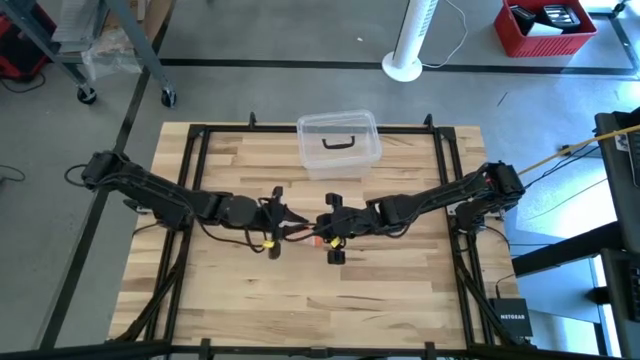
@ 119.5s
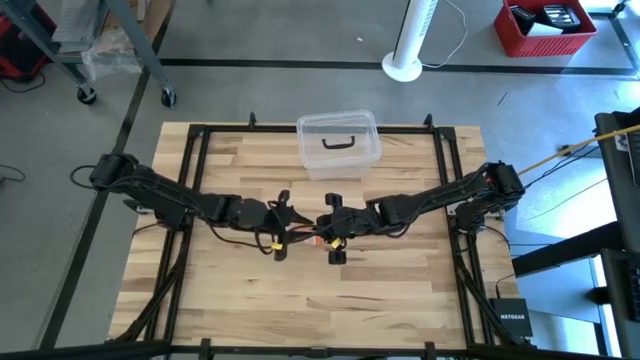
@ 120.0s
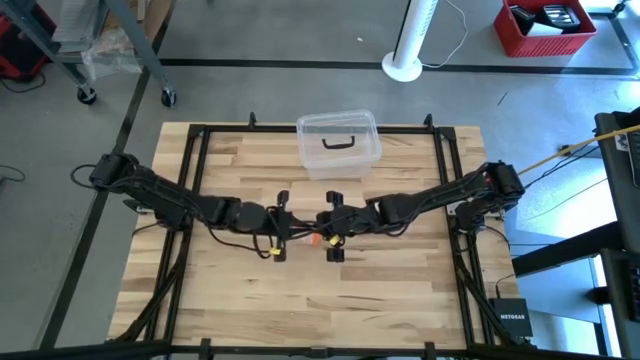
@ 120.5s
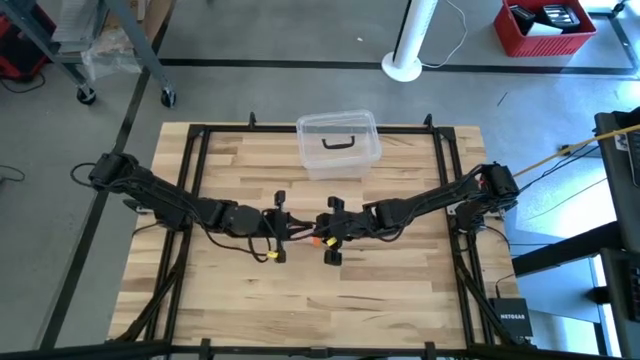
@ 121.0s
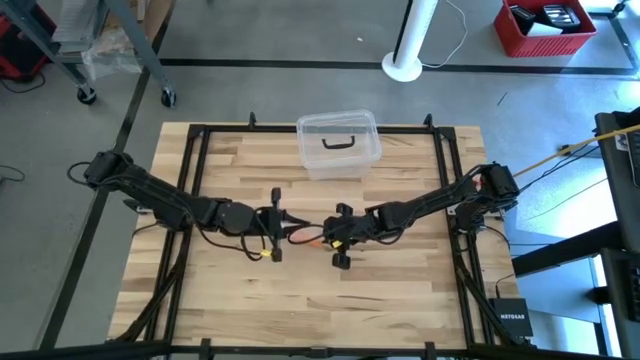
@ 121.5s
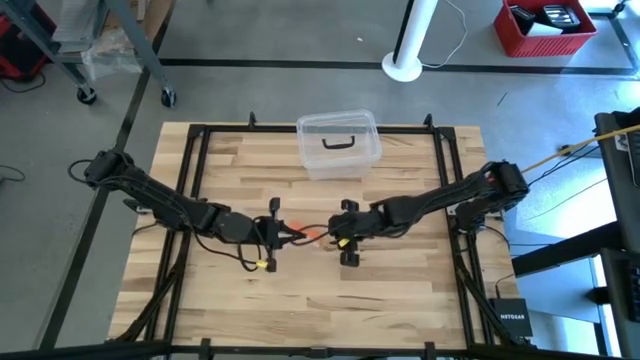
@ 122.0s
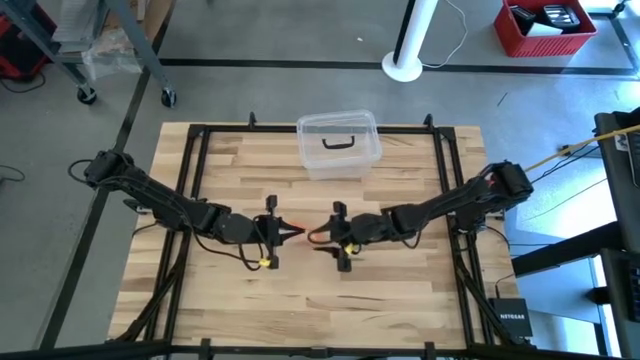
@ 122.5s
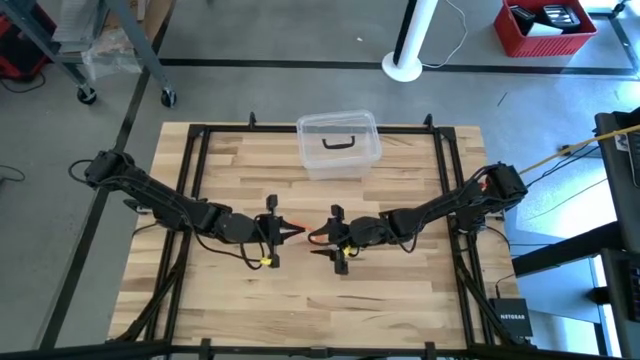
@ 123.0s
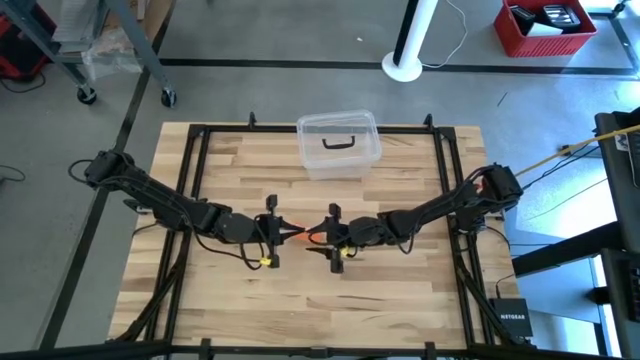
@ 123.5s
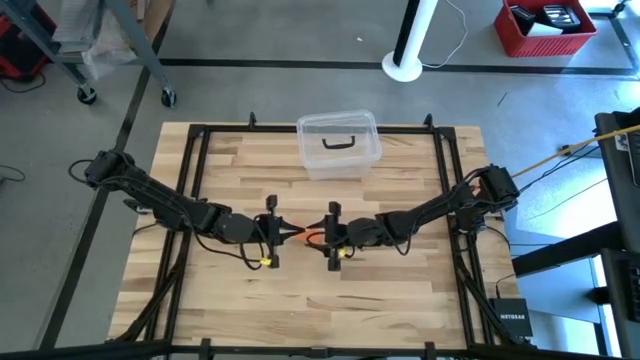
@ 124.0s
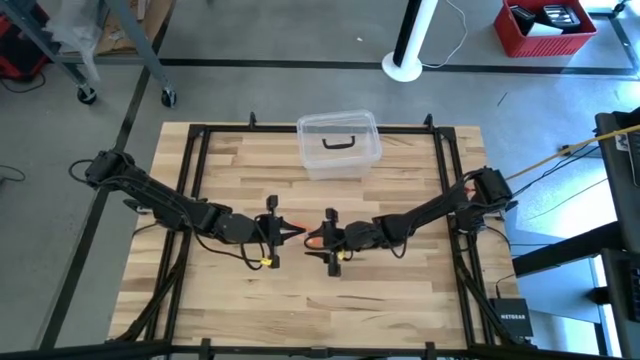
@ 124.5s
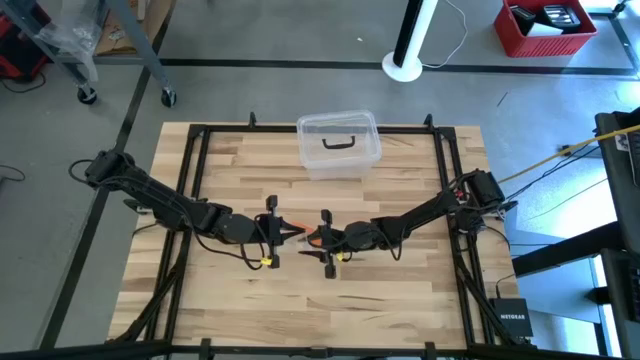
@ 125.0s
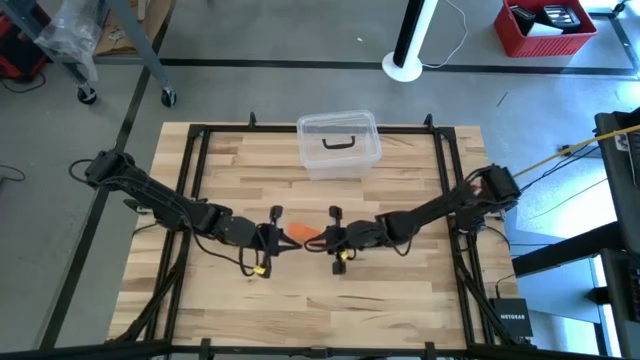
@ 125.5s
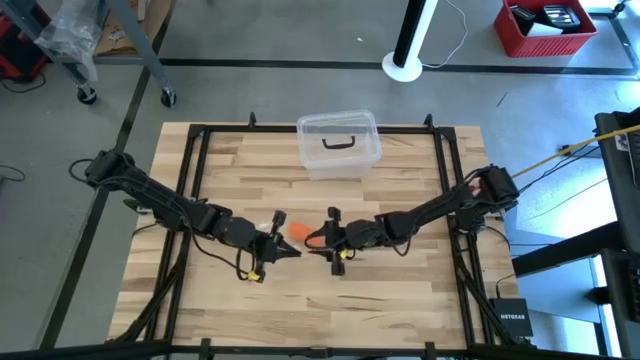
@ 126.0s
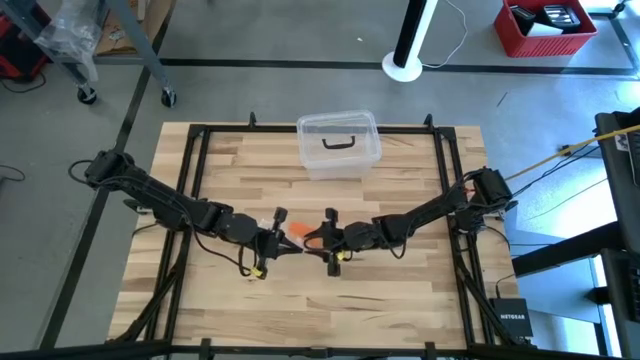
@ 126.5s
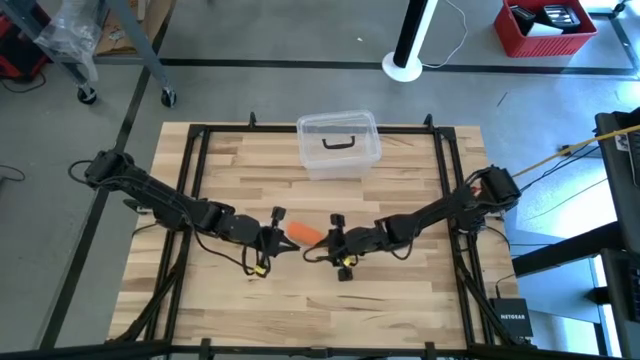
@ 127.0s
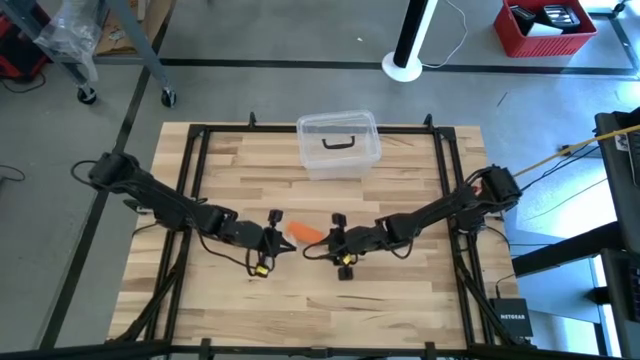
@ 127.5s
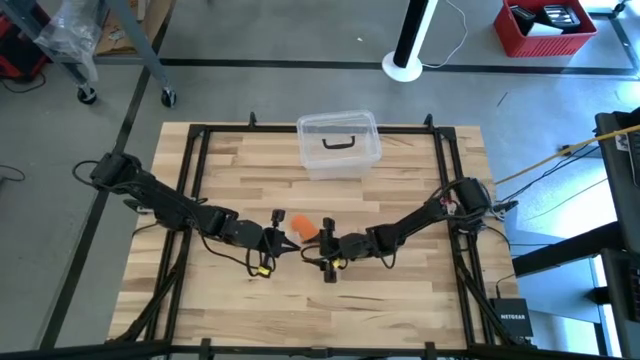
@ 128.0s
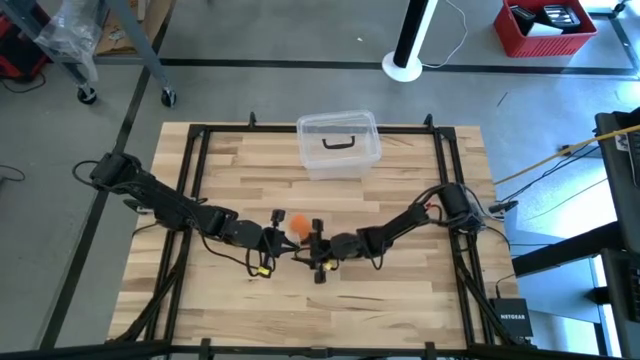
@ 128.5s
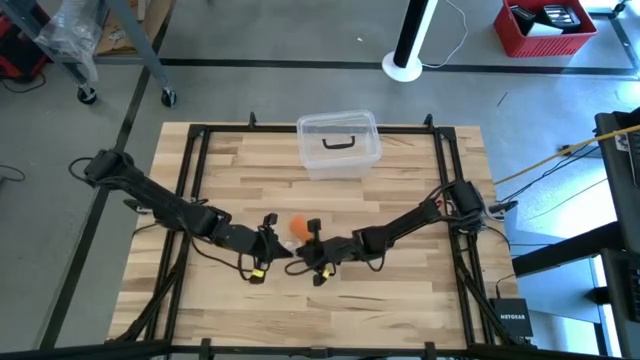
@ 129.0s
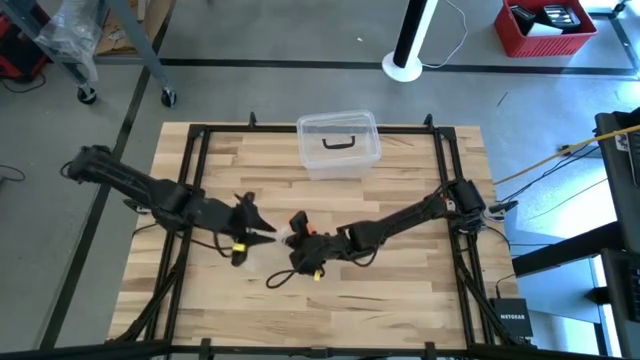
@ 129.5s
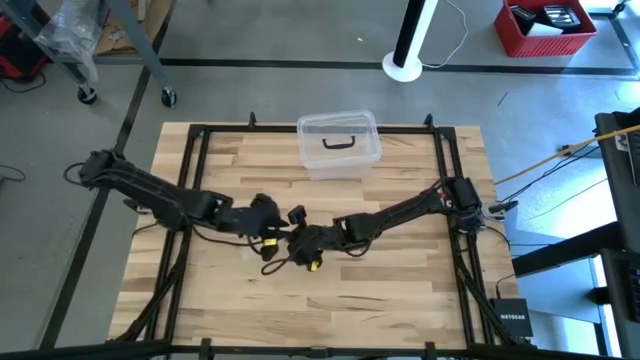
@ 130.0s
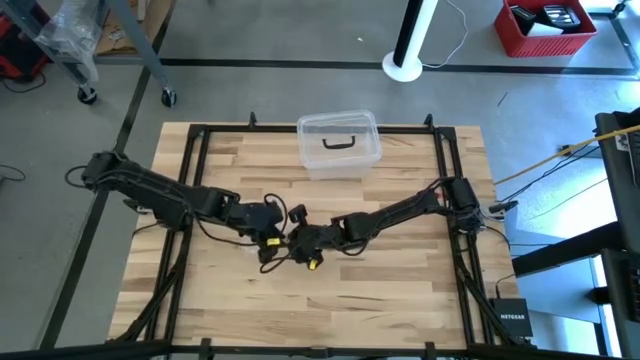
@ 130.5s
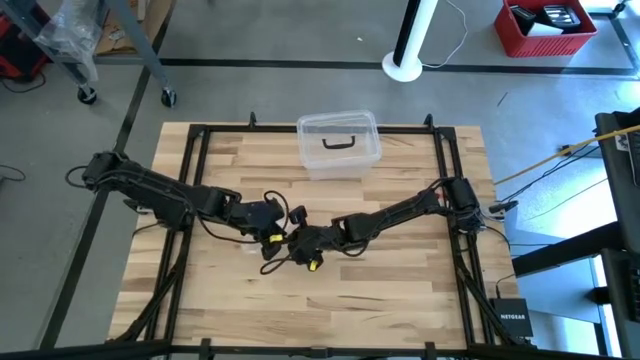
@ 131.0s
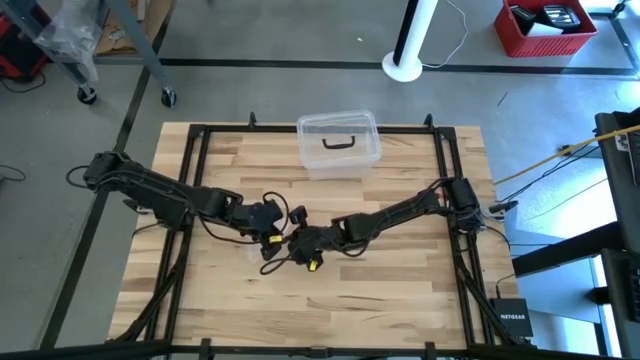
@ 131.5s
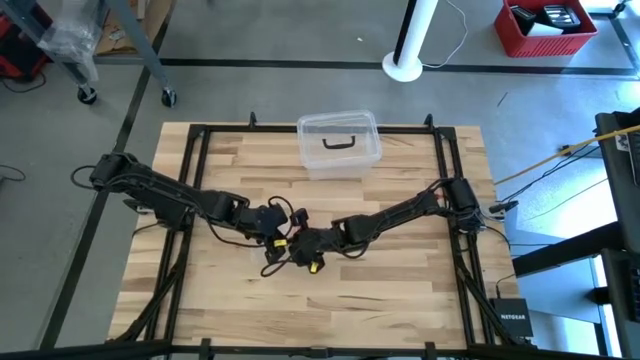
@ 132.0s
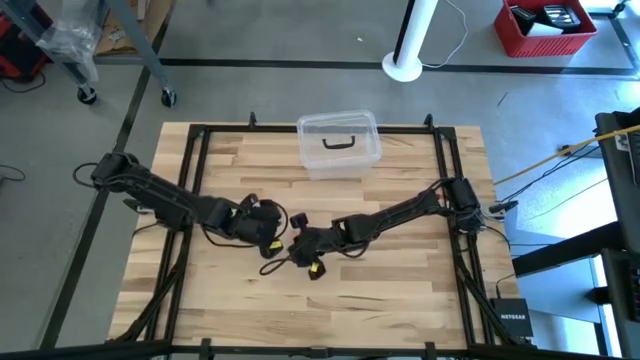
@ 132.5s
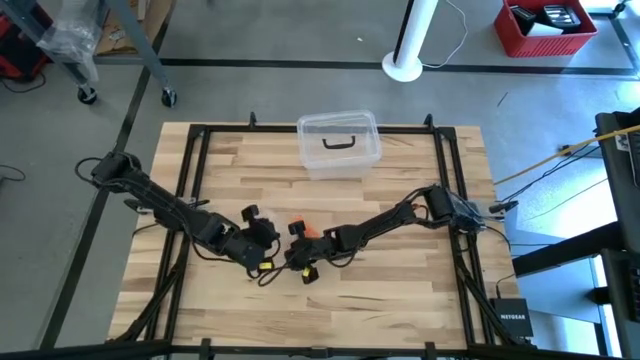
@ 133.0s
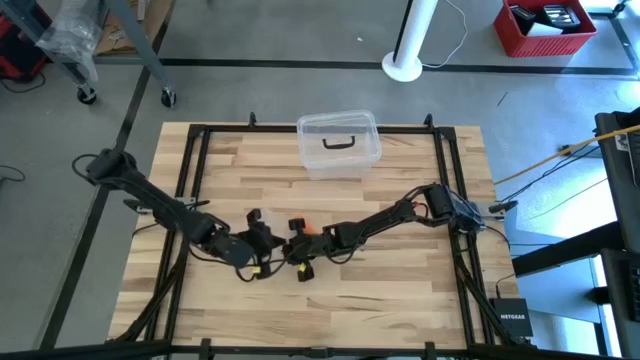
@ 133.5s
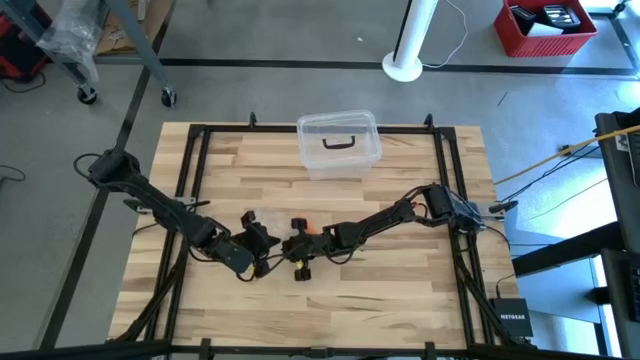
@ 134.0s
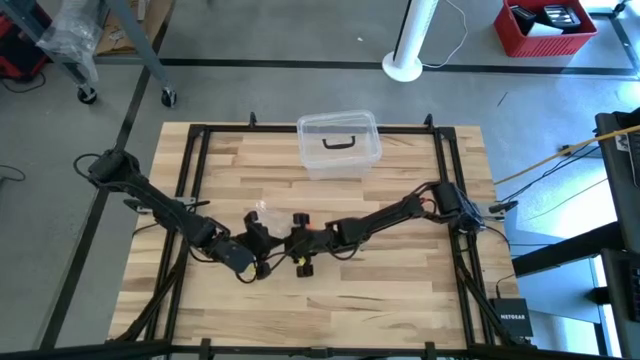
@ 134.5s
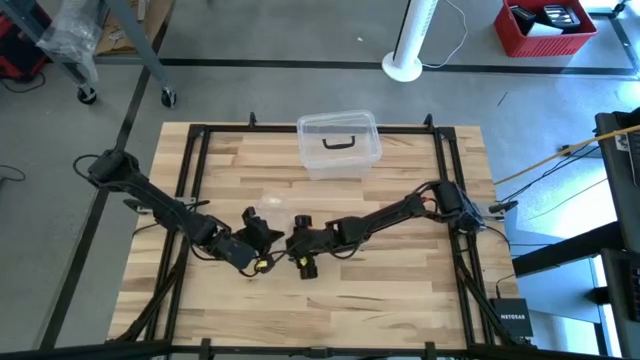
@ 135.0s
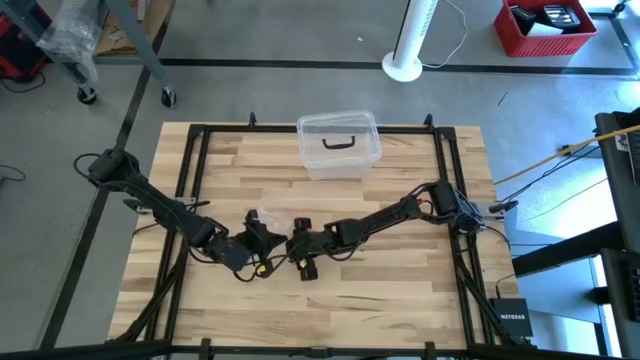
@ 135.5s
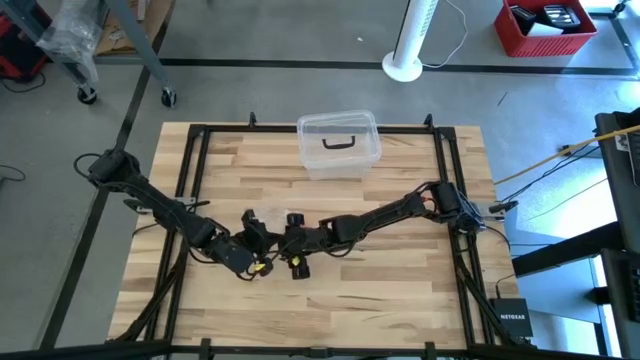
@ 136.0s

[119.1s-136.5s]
Task: Roll bandage
Open the transparent zip bag

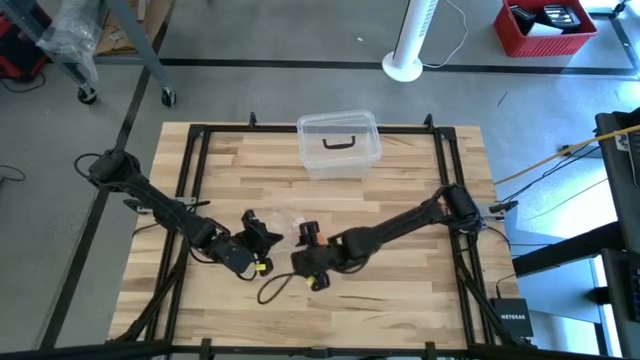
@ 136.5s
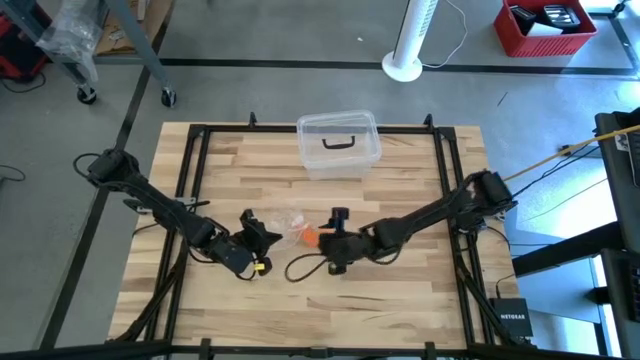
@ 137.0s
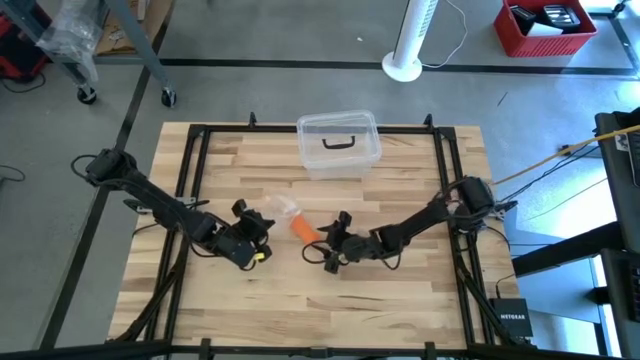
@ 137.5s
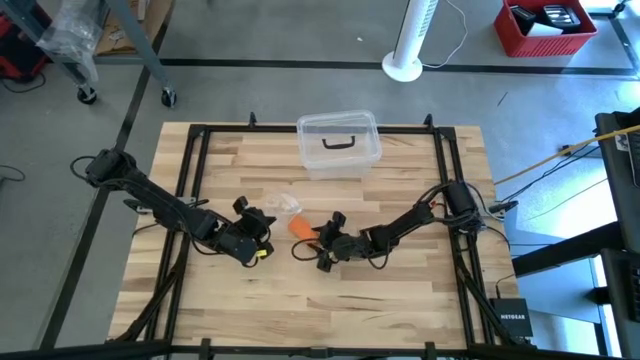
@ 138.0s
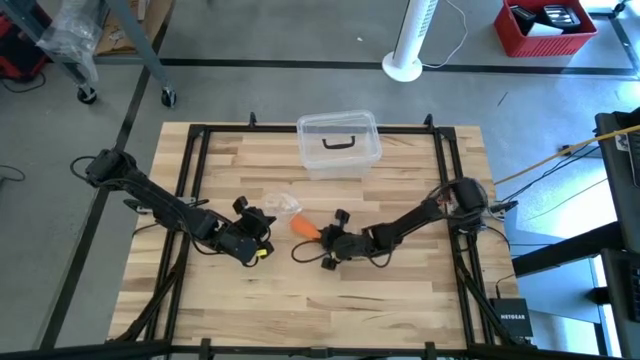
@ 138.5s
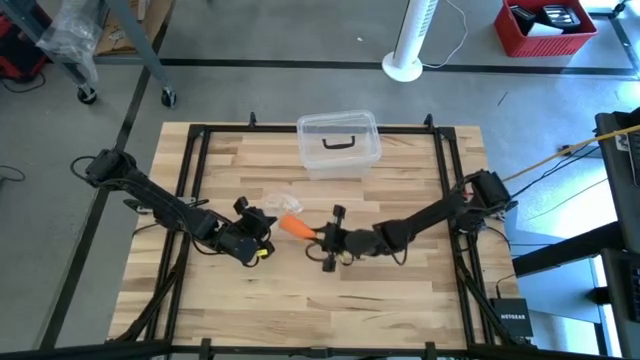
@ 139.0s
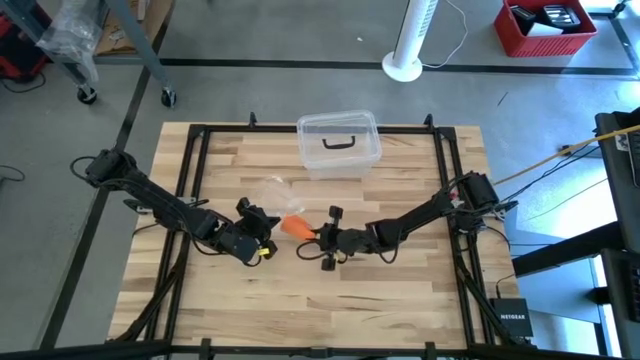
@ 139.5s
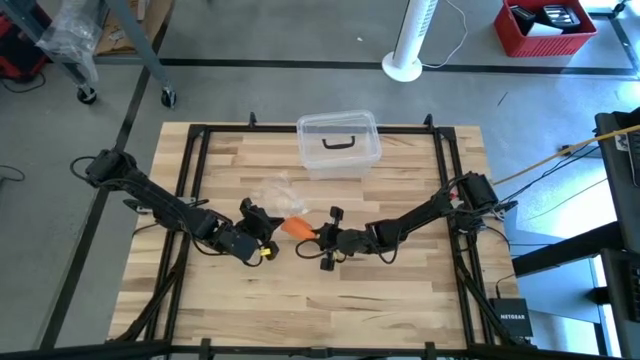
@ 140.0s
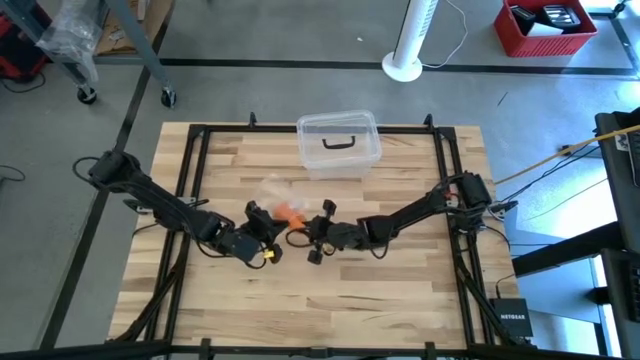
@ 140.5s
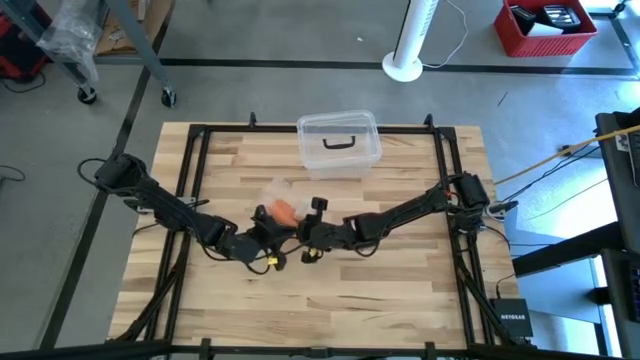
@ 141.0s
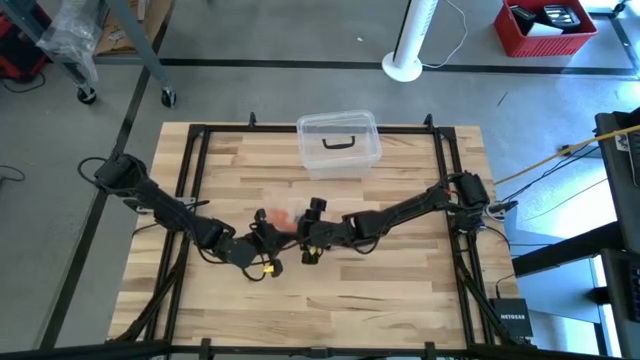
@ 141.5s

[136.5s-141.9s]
Put the rolled orange bandage into the transparent zip bag
